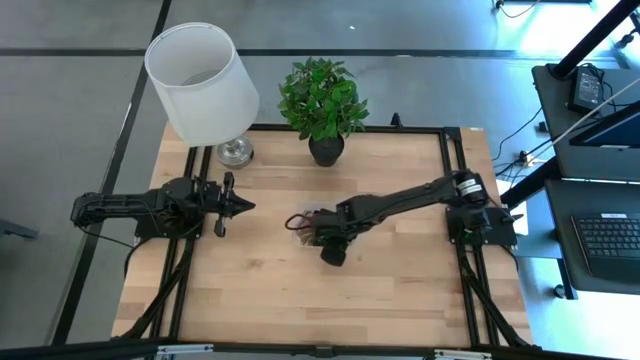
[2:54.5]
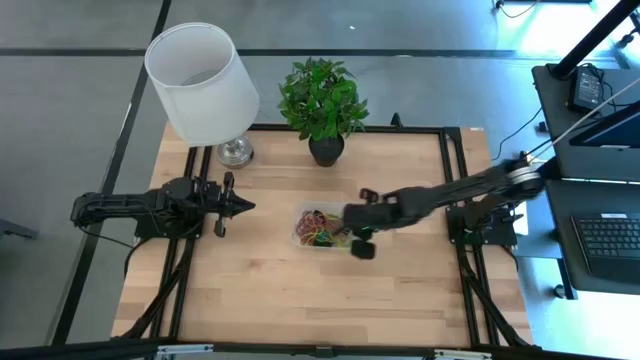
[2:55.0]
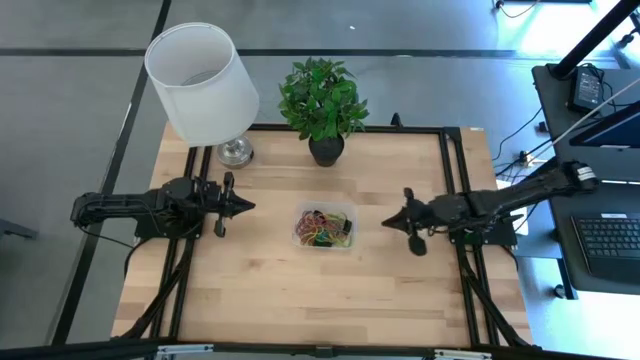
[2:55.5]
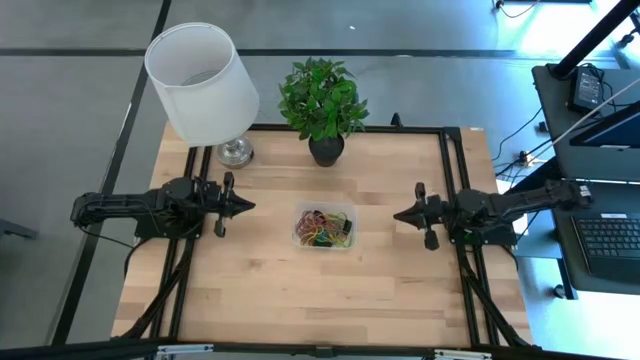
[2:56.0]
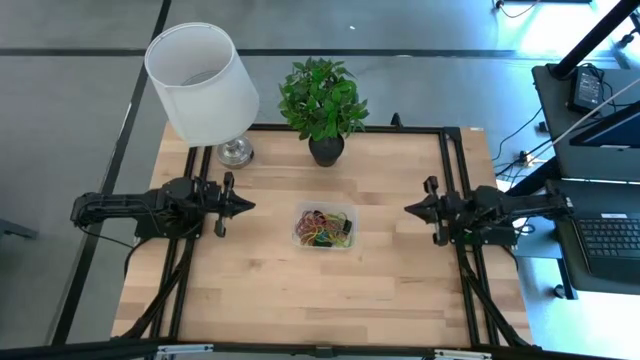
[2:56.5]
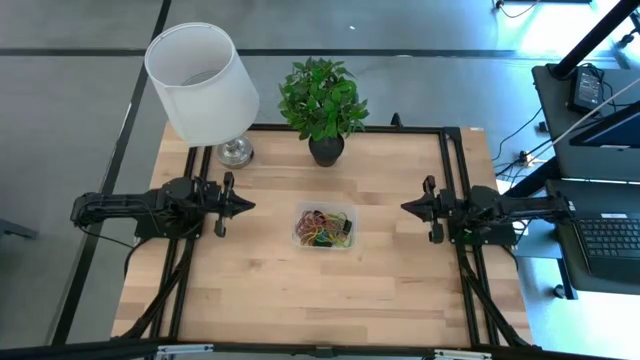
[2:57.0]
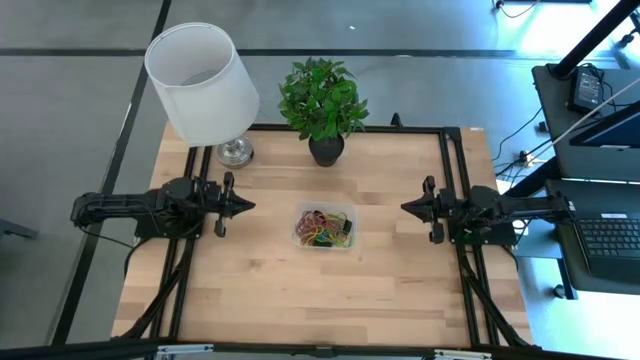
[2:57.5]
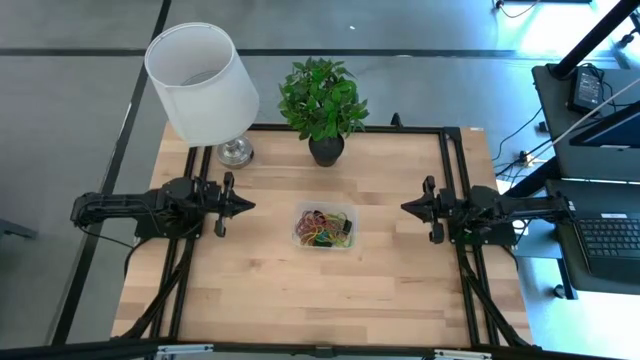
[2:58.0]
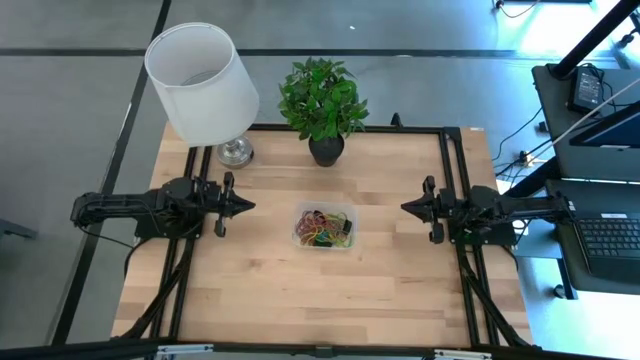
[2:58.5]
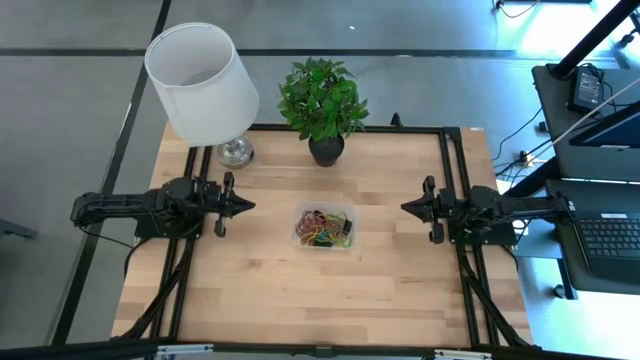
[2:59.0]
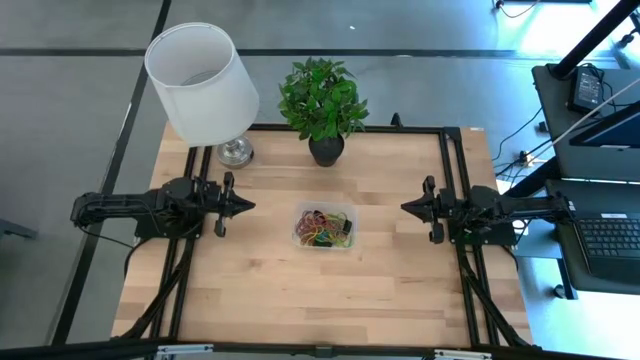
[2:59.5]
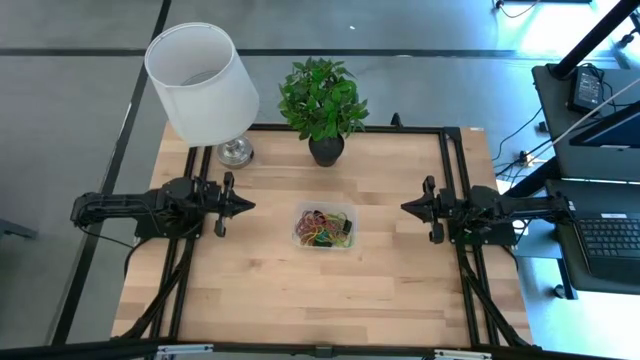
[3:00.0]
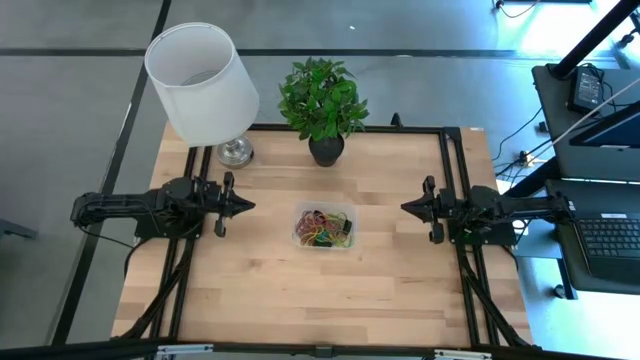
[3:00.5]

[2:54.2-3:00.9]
Task: Pick and place rubber bands into bin
Return to Home Position

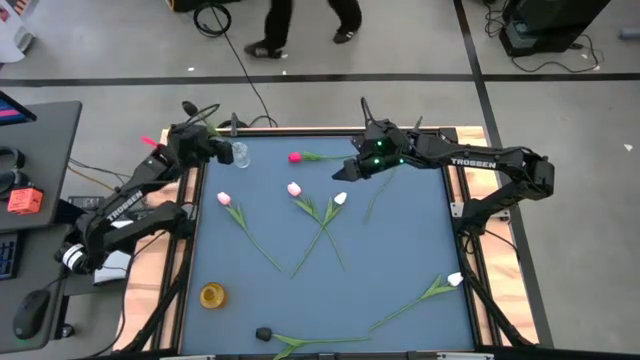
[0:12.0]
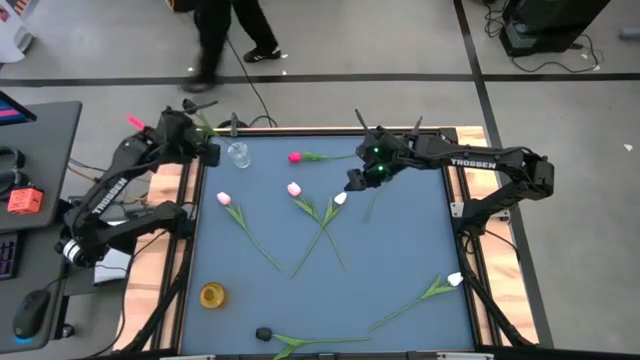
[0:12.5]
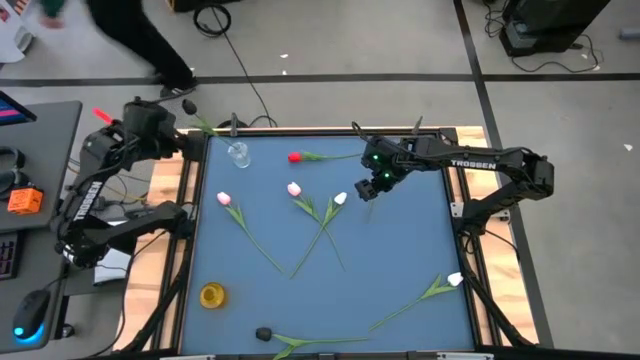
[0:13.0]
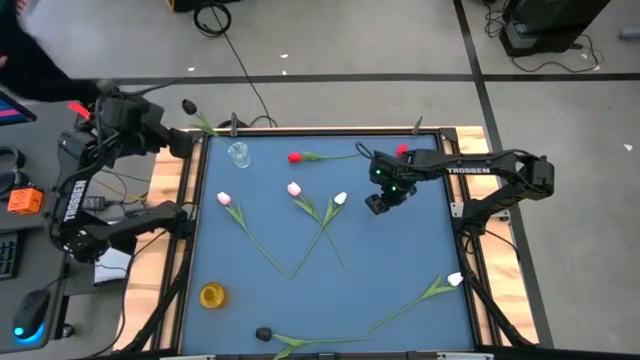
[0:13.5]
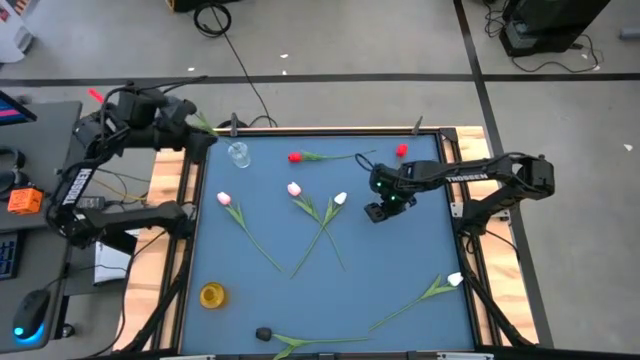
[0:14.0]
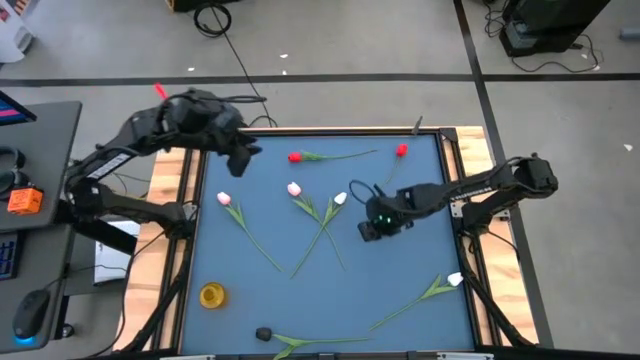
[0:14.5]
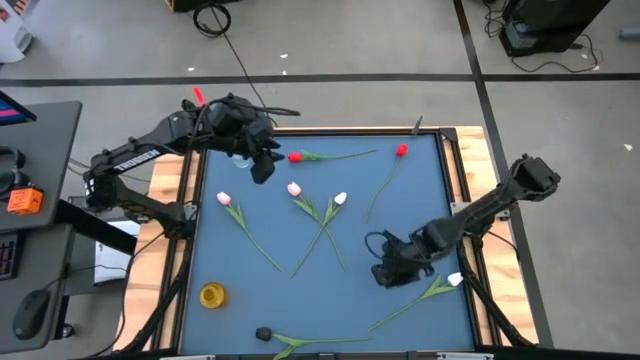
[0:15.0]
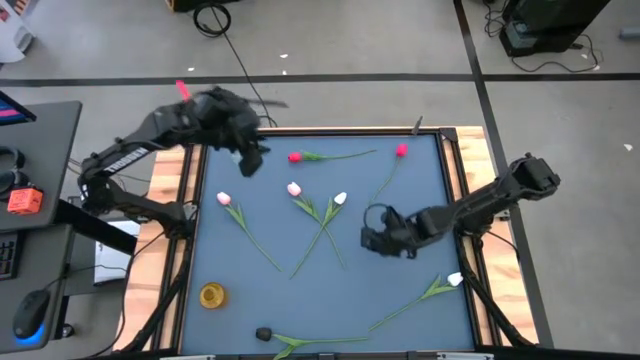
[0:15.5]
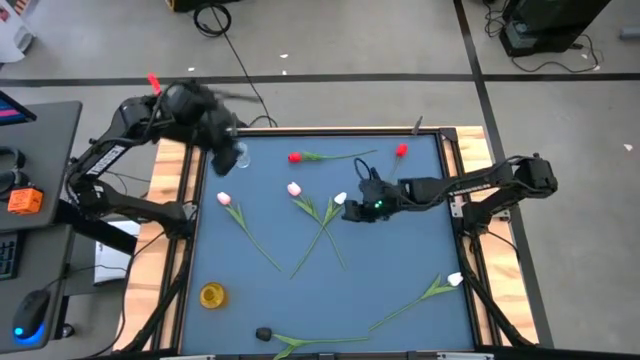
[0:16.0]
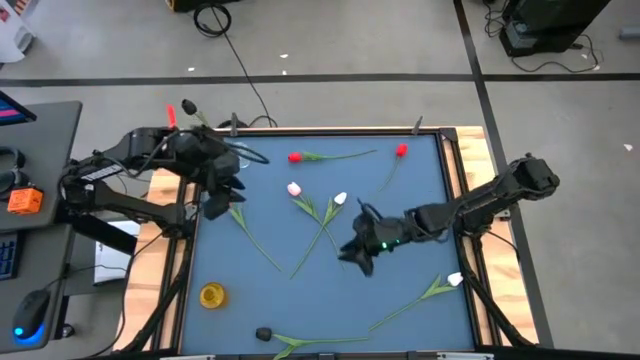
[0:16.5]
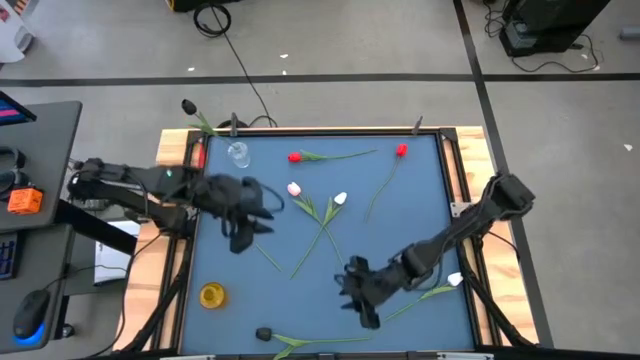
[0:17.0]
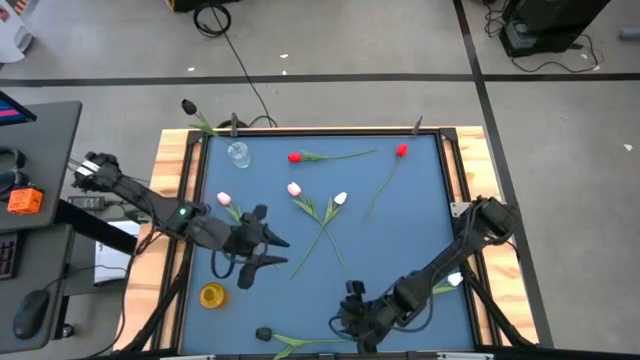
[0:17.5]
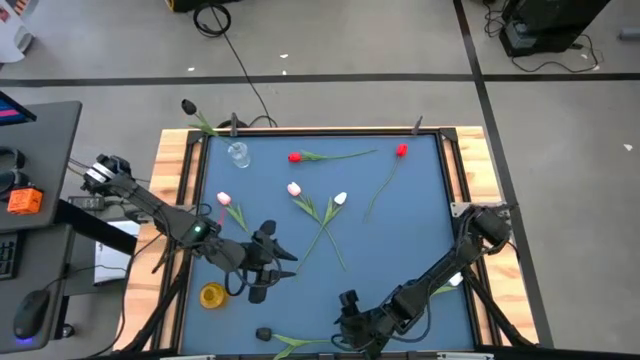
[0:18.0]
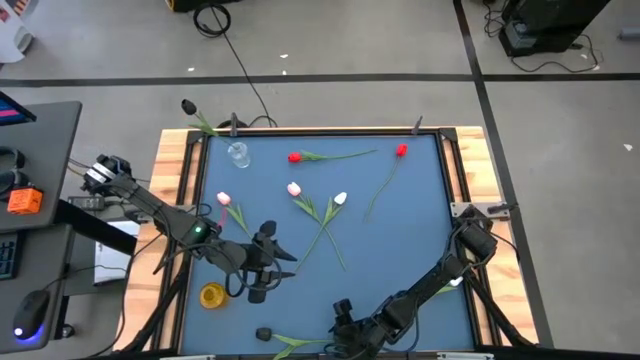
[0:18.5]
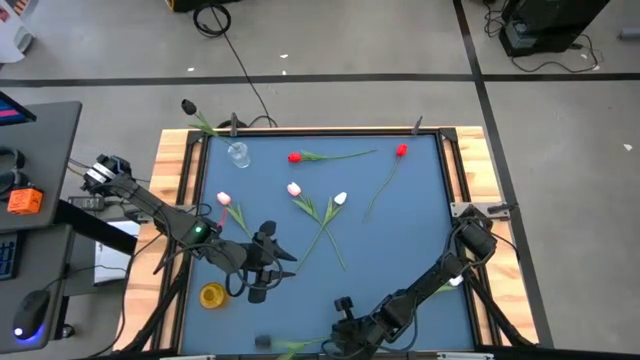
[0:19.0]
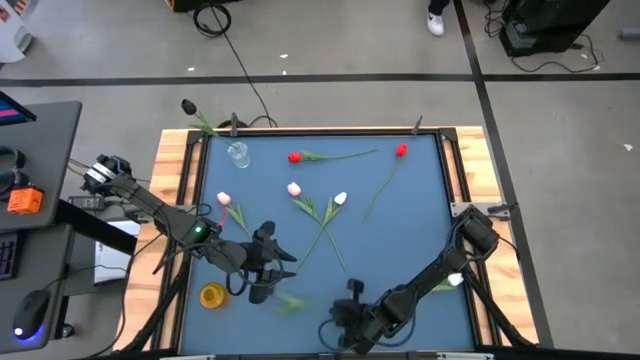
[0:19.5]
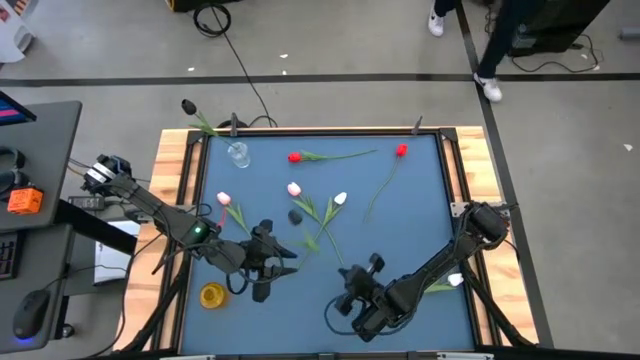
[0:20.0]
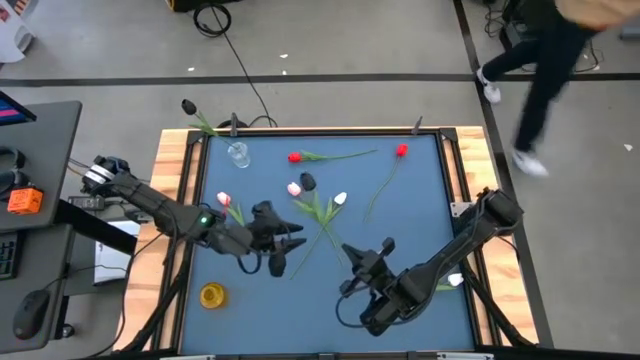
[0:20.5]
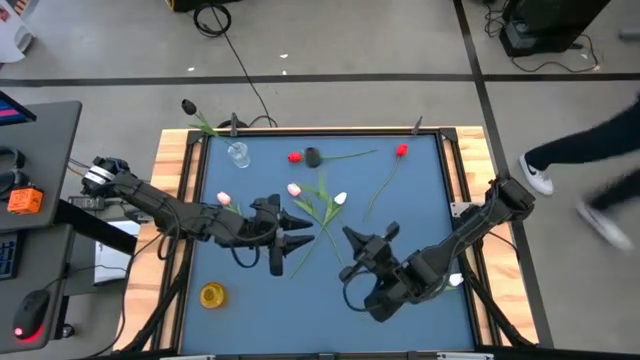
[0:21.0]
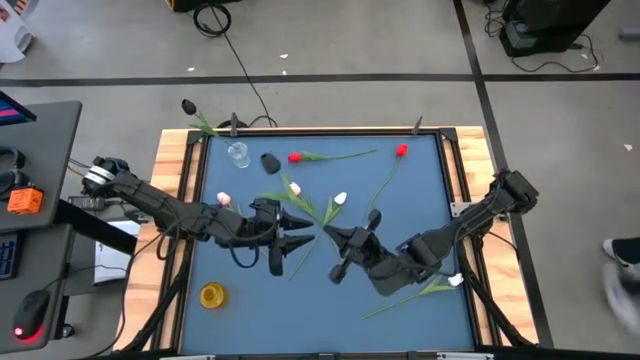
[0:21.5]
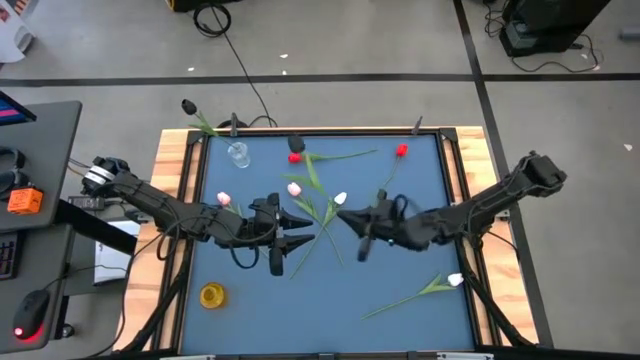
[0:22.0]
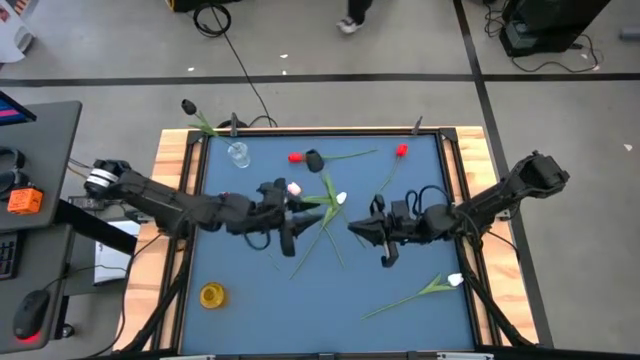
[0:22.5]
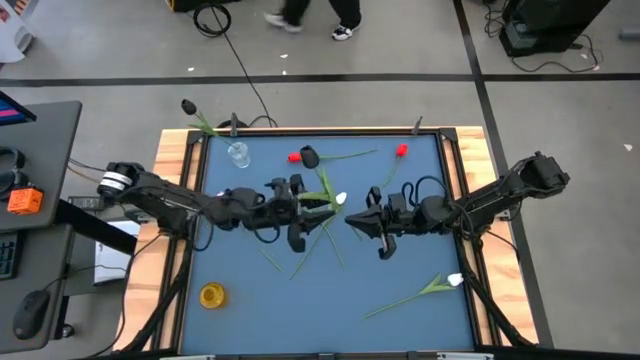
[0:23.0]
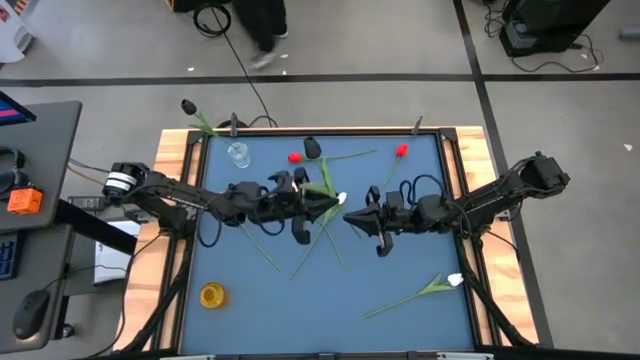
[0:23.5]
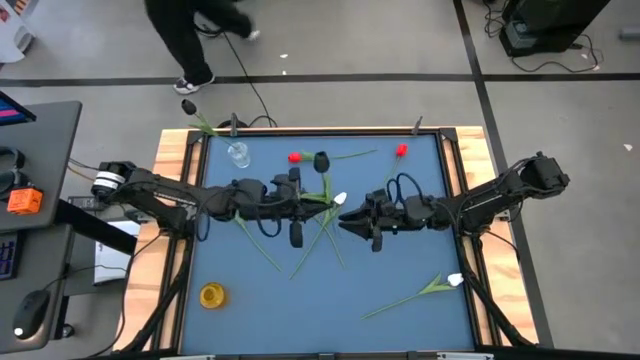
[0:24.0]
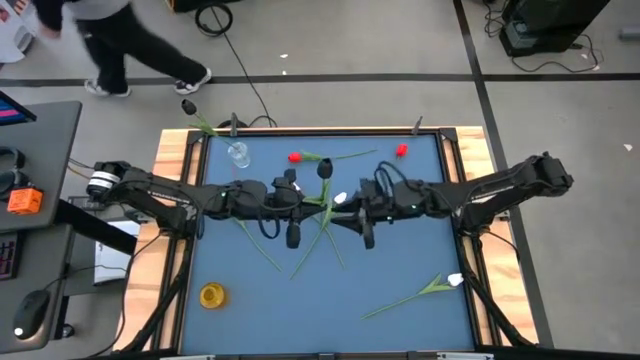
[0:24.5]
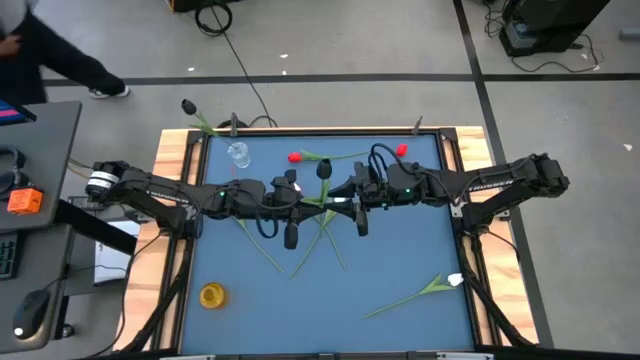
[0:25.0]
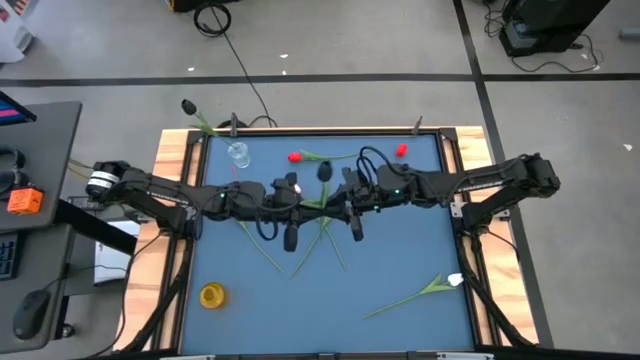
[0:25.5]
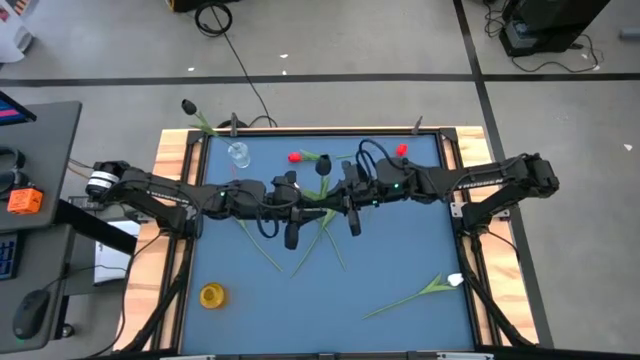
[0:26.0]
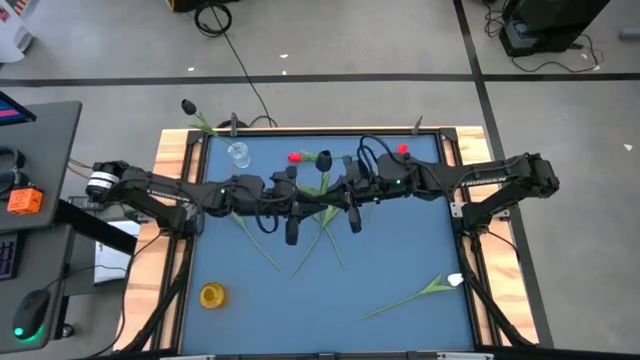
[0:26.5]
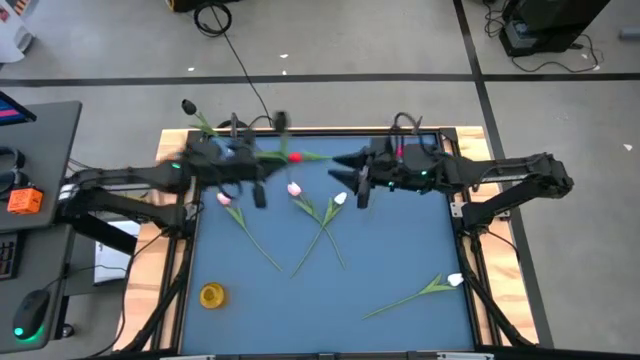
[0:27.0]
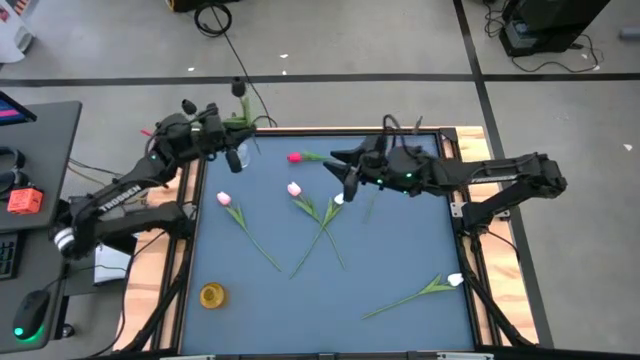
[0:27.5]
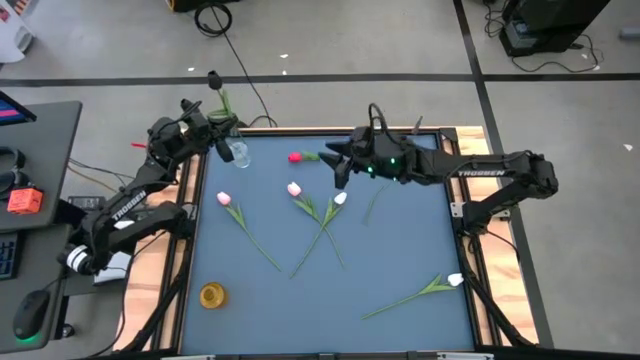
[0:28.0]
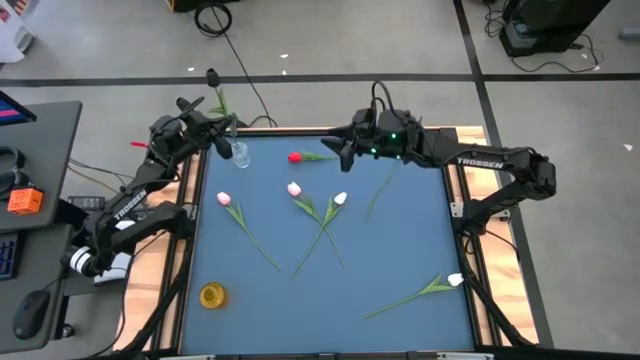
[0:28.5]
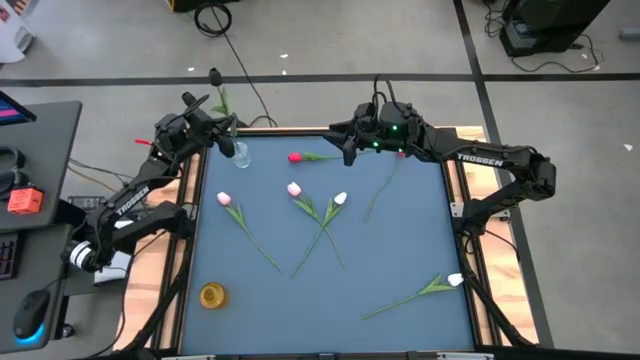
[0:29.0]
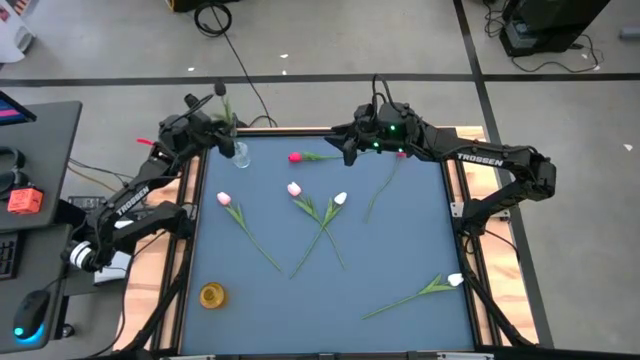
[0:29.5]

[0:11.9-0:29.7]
Task: Sort flowers into vase by color
Put the black tulip into the transparent vase
